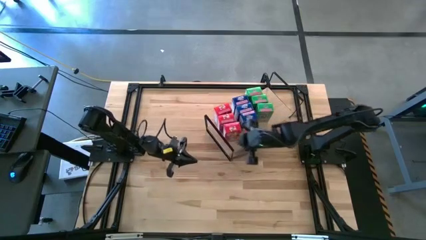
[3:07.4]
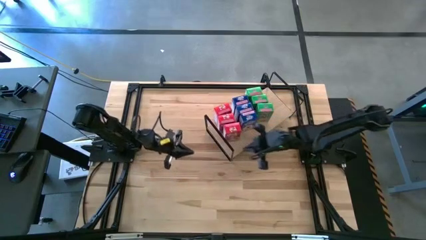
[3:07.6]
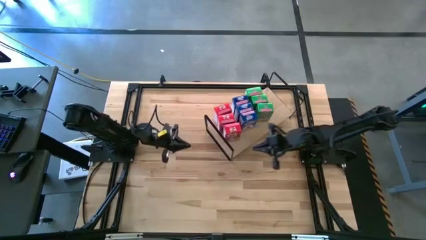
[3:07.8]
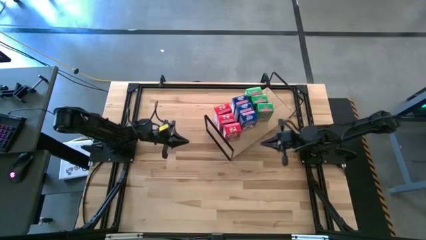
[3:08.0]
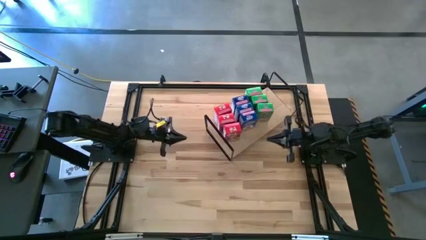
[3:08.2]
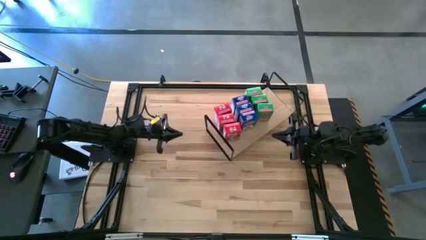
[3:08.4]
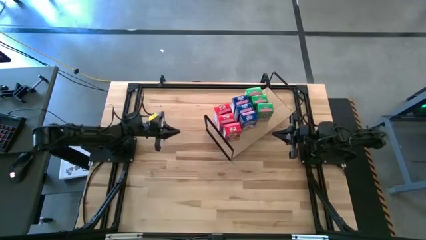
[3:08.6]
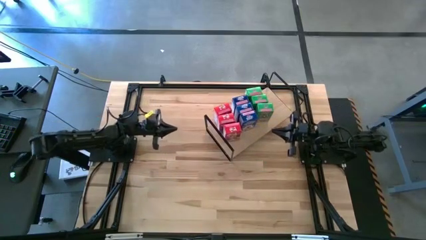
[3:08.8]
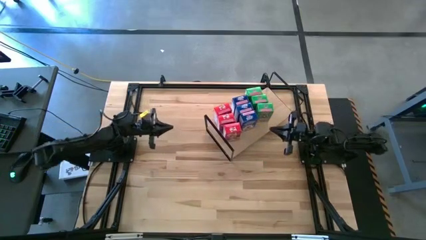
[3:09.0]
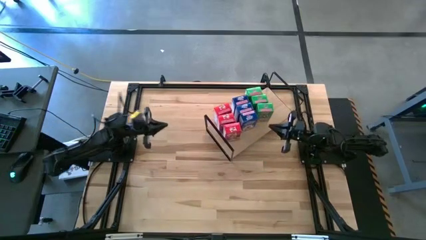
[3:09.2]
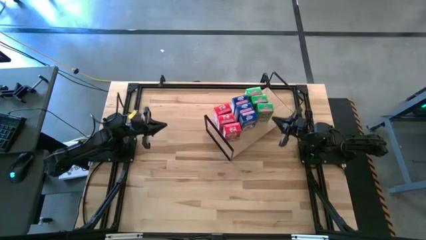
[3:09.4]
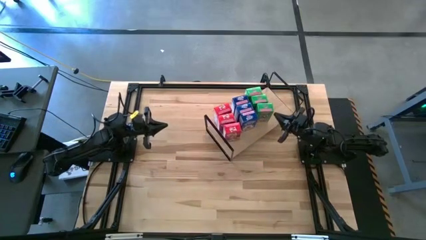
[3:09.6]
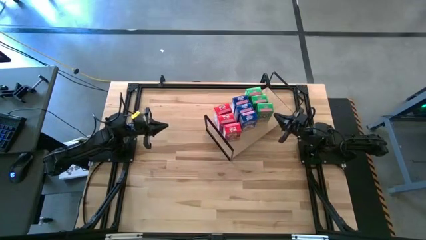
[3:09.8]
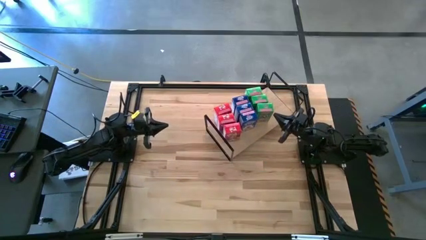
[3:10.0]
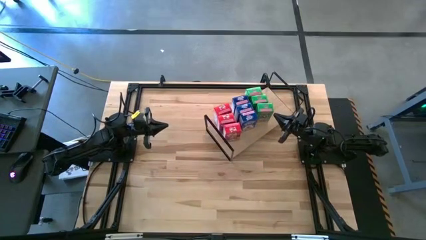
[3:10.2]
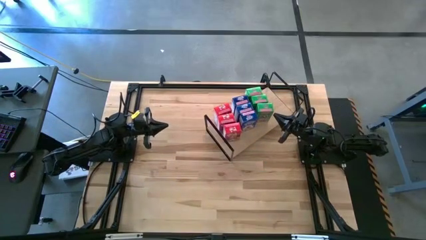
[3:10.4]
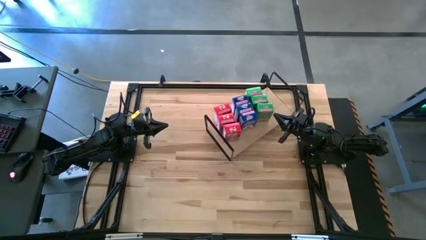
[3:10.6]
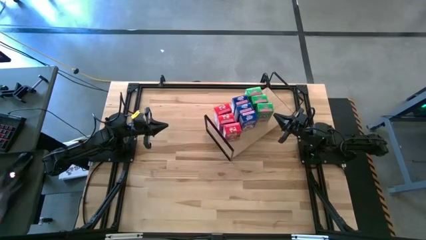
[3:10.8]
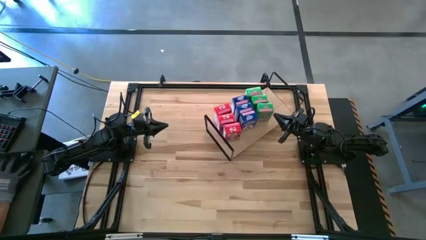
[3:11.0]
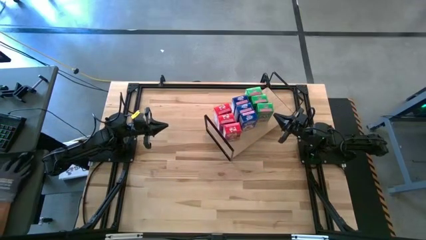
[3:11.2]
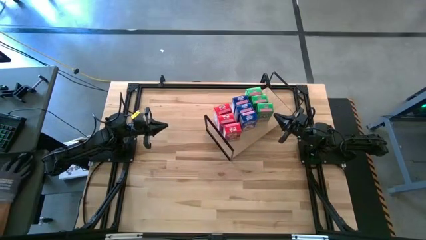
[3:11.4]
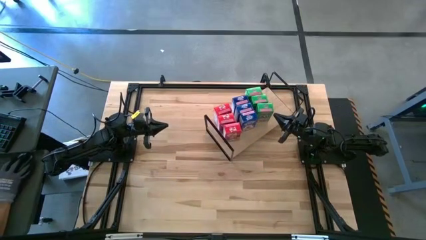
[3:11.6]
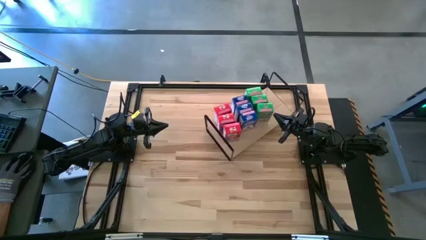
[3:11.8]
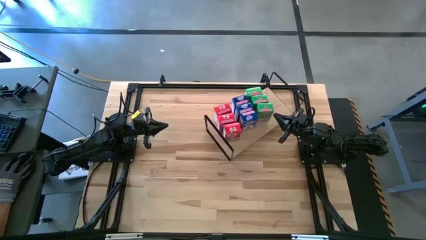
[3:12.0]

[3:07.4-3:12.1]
Task: Stack cereal on shelf
Return to Home Position

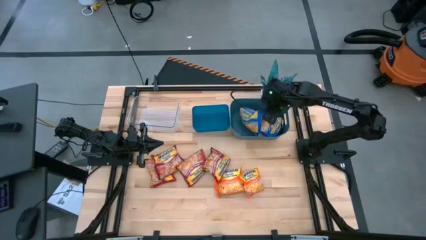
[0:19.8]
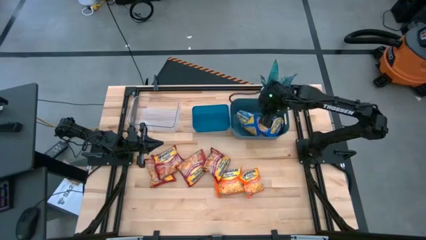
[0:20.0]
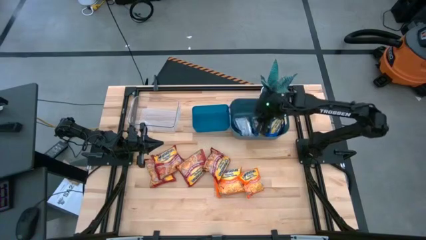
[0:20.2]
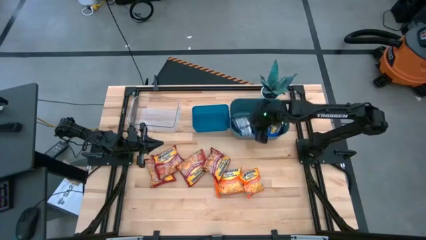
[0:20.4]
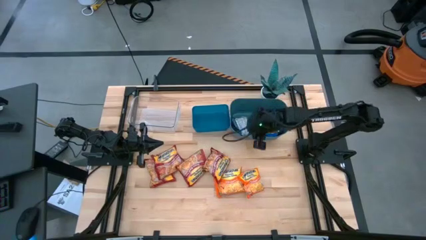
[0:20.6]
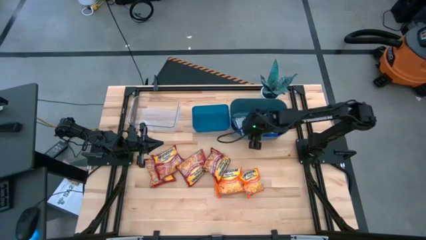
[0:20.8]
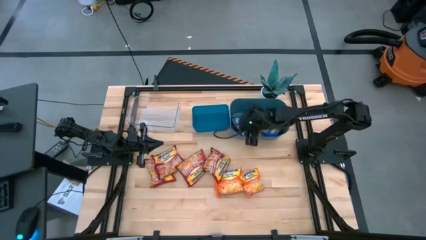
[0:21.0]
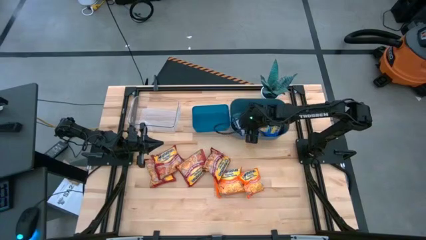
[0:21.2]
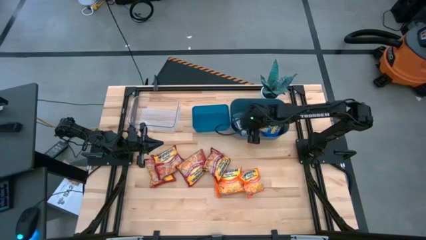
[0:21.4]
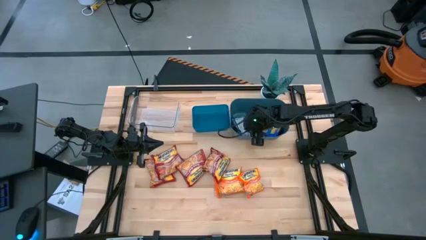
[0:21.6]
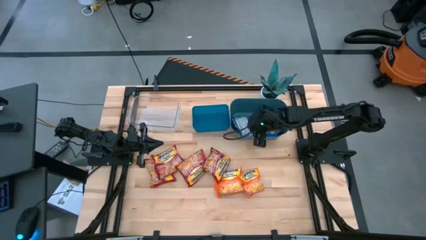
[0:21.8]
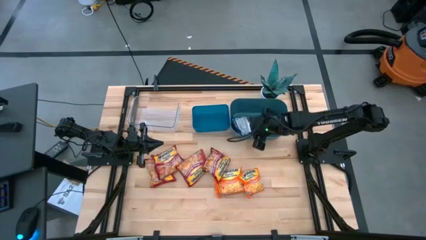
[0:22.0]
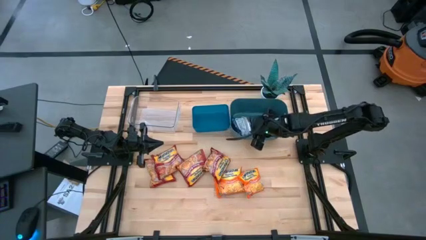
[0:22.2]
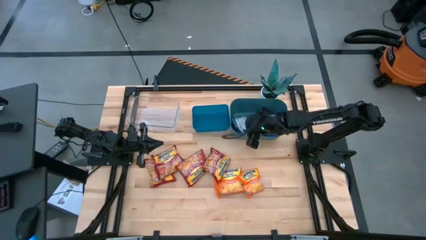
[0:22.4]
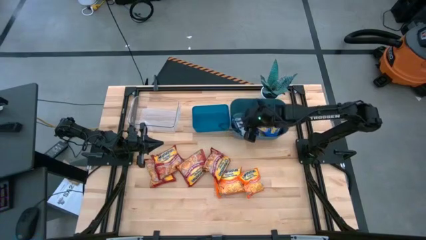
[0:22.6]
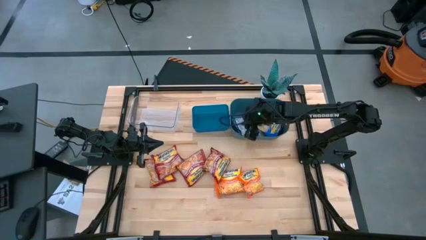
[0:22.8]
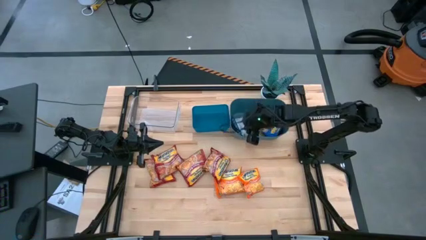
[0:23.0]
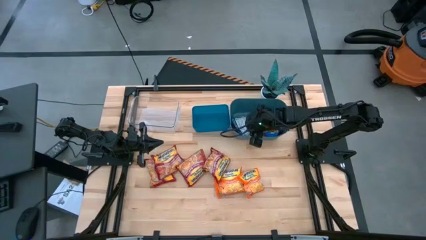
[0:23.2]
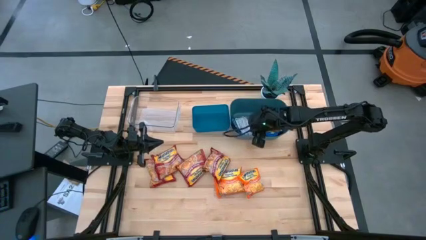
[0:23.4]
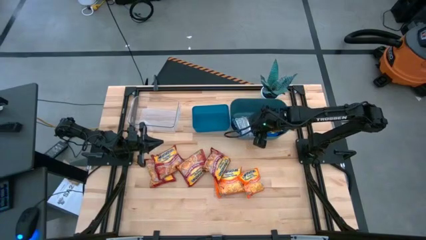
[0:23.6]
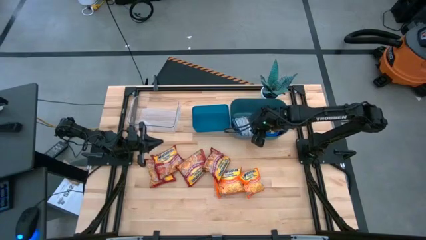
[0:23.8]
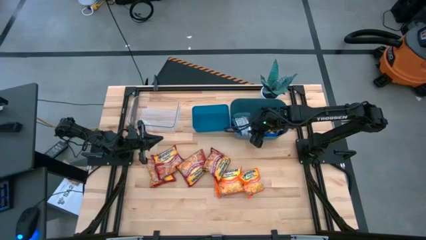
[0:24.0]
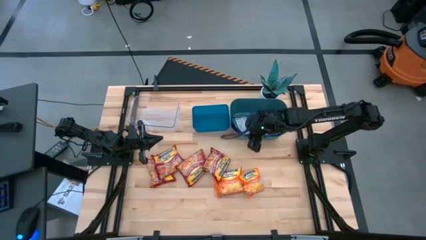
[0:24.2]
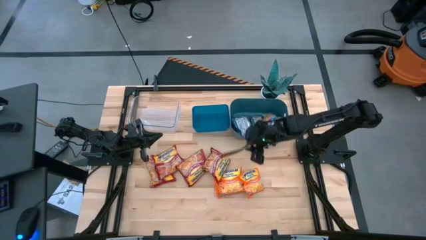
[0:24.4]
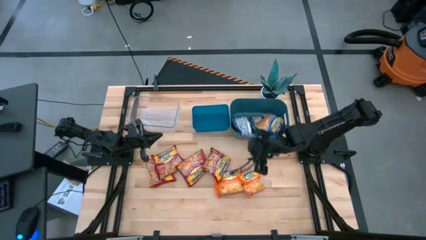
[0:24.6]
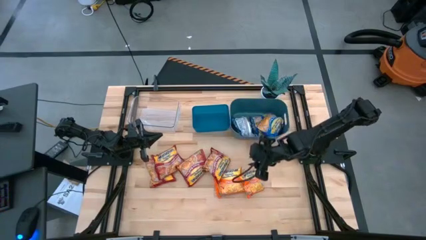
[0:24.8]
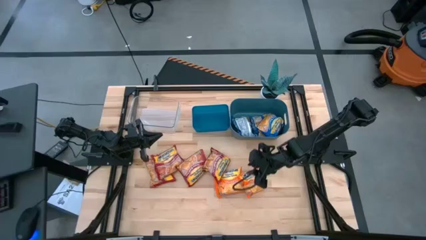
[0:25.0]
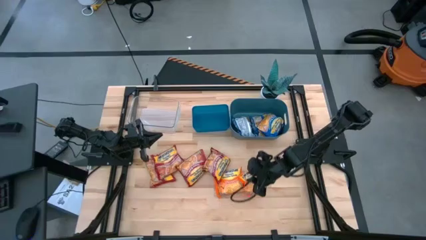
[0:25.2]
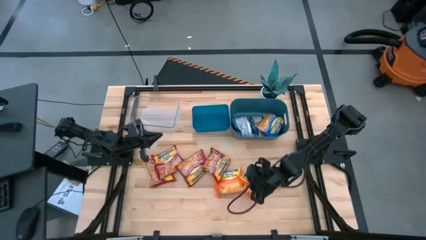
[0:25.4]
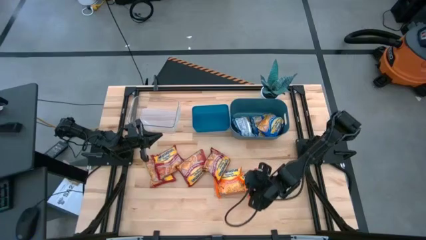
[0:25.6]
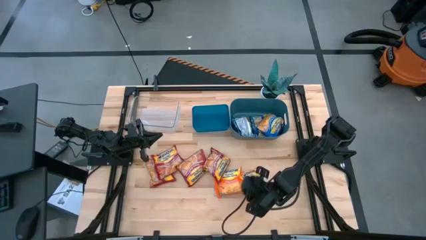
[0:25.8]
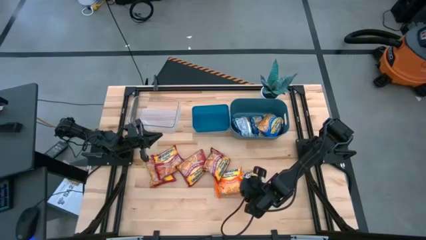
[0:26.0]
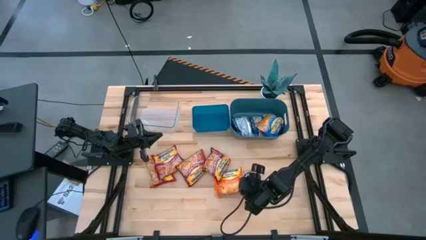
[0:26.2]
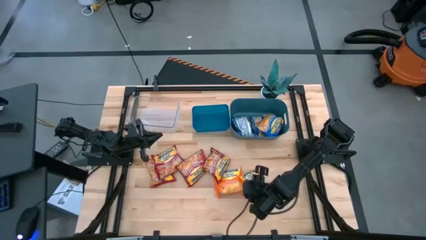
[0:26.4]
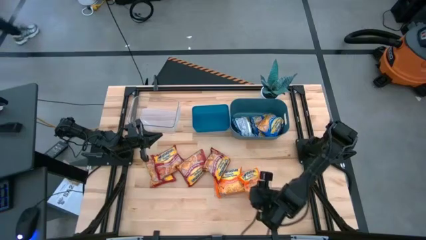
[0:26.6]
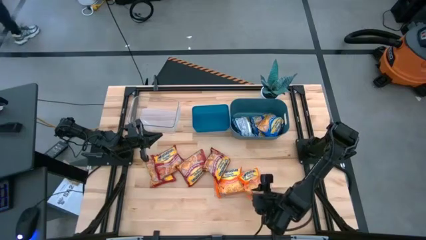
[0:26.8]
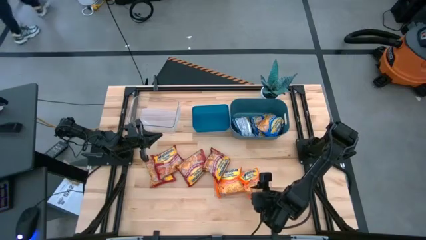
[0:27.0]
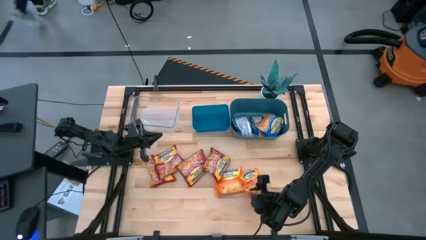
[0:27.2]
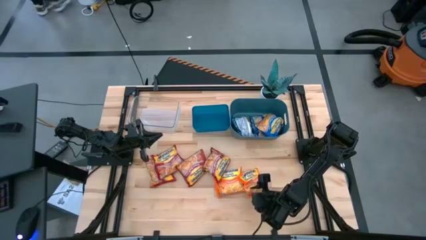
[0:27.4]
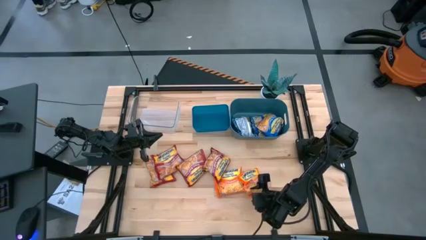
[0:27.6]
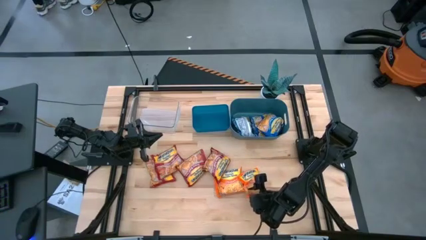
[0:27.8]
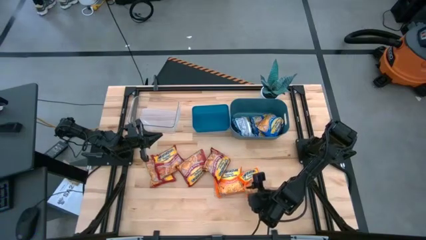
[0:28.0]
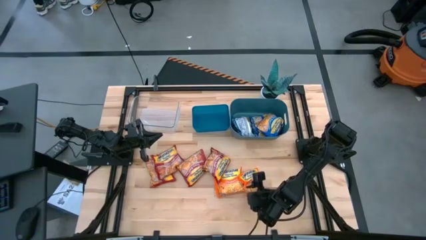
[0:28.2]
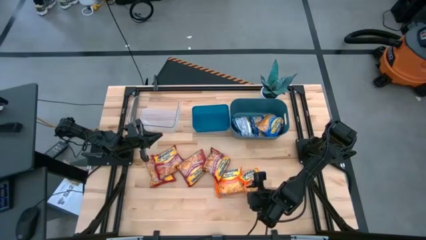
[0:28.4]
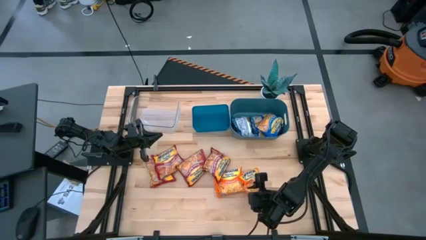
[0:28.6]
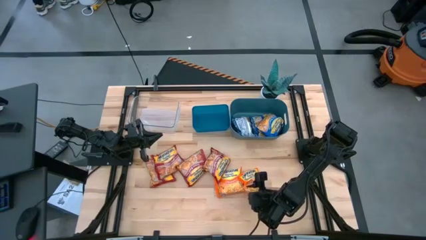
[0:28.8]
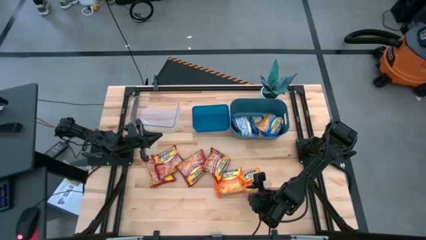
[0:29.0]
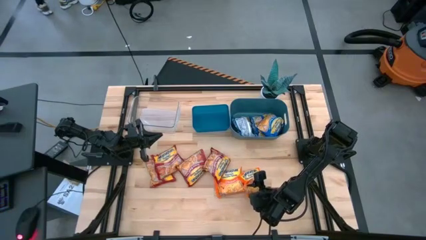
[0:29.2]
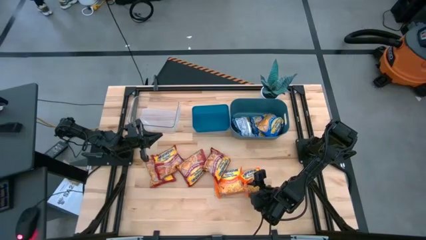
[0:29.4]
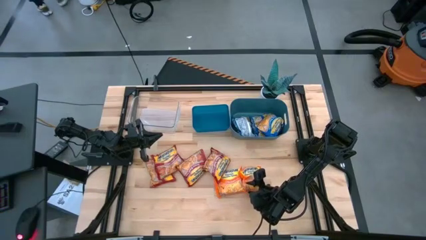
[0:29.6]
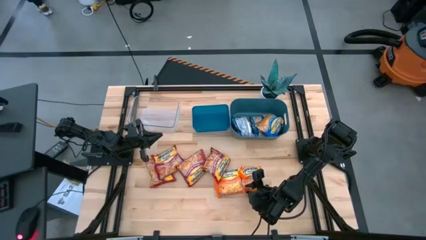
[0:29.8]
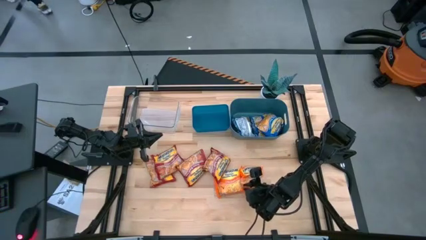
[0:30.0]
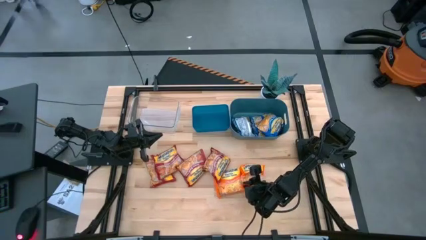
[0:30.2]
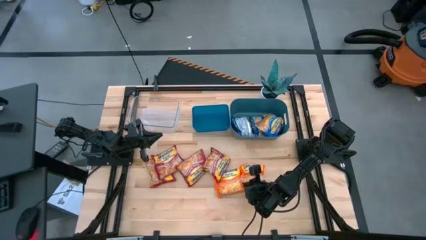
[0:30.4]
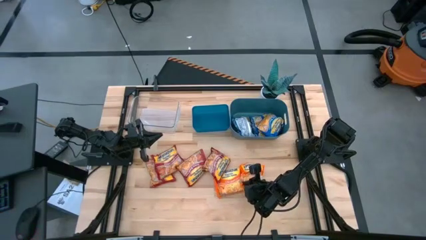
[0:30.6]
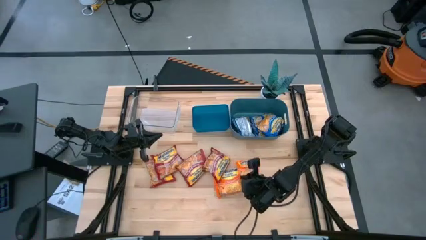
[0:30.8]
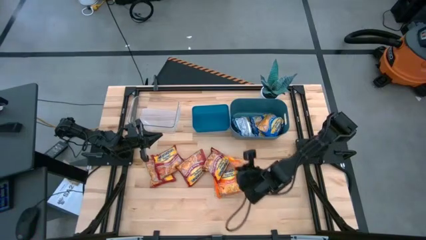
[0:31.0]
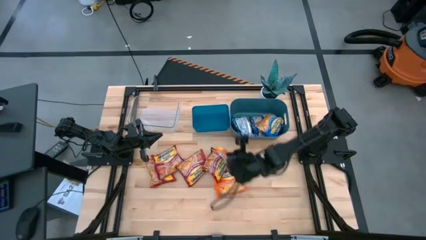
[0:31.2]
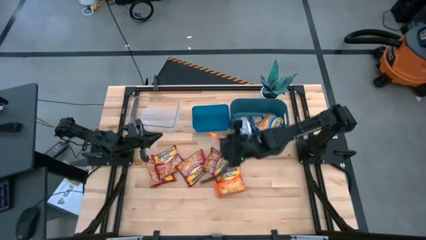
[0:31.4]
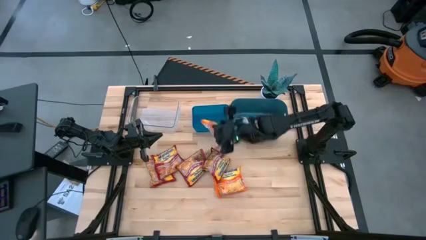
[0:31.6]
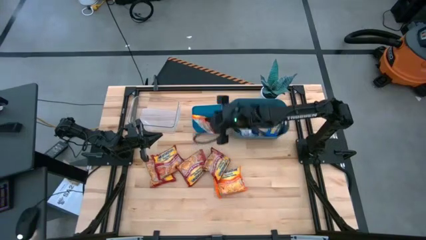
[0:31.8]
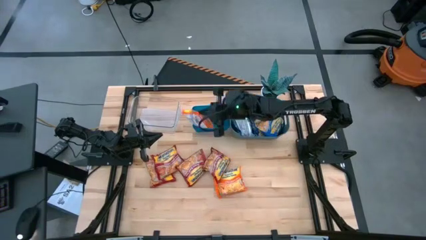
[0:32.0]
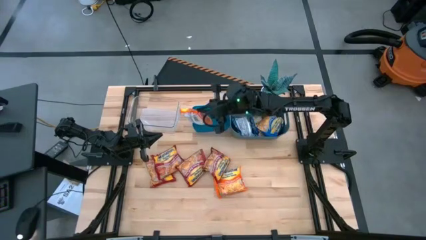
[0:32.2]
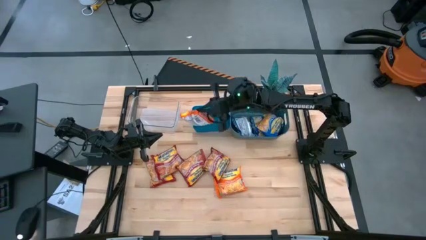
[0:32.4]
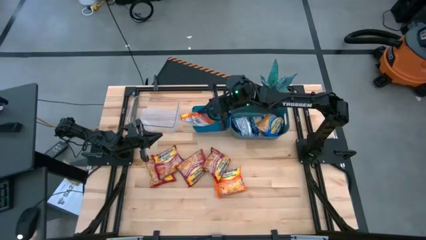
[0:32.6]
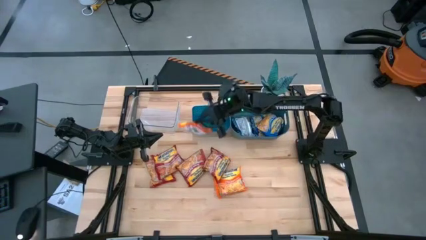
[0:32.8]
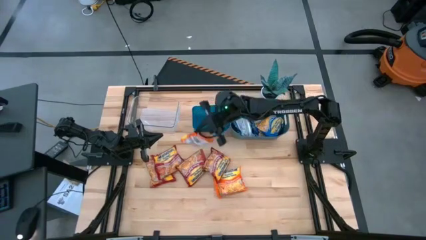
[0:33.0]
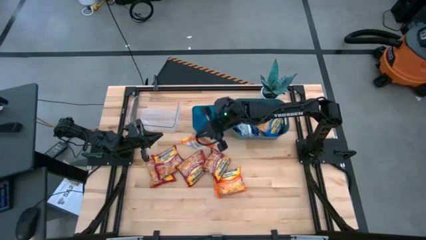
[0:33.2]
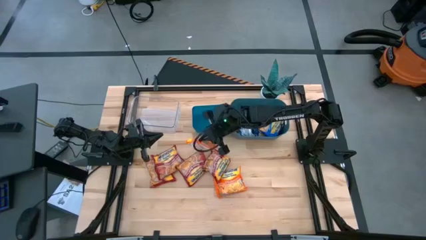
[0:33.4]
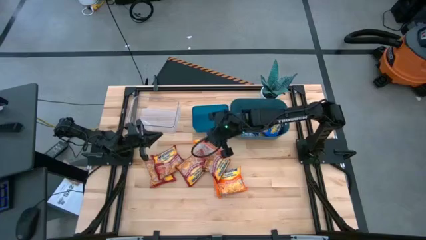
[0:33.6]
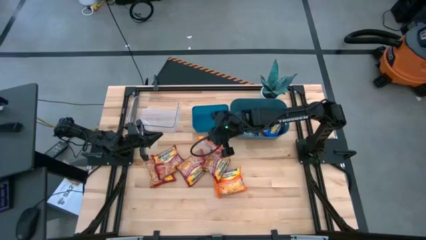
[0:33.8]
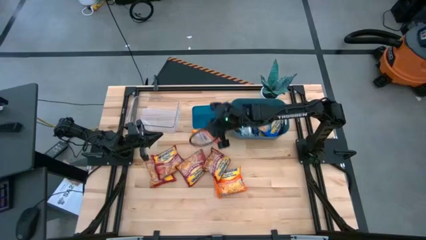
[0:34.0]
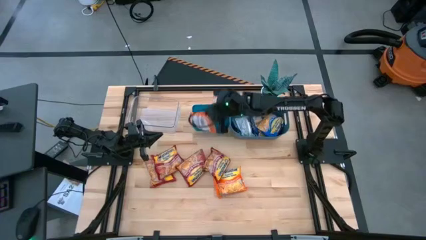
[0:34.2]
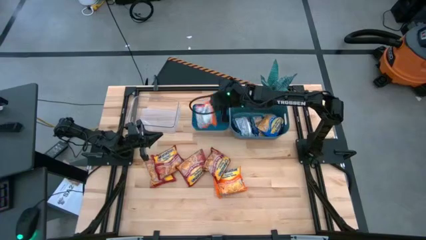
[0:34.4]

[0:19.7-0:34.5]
Task: Sort Maruchan noodles
Put the orange noodle pack into the blue bin
